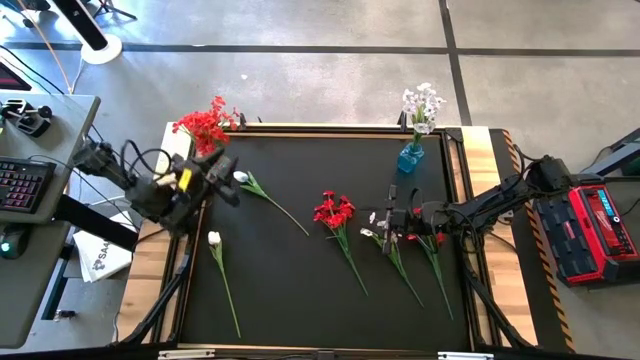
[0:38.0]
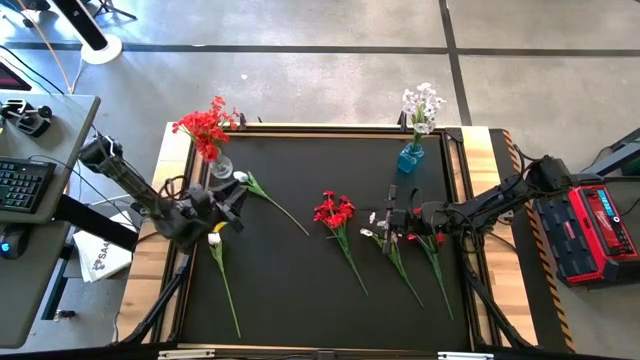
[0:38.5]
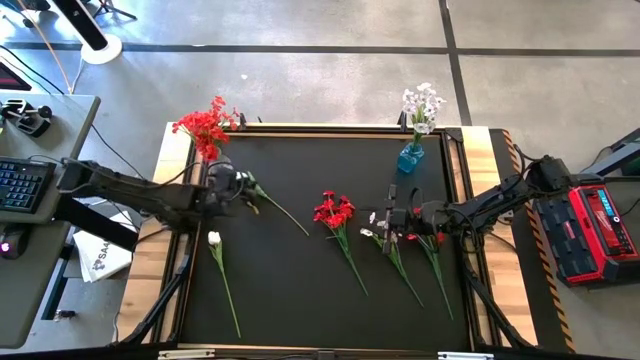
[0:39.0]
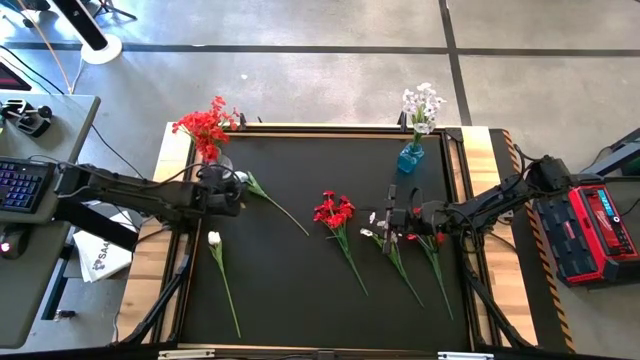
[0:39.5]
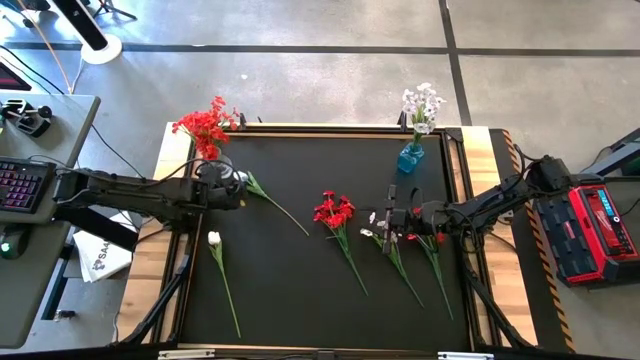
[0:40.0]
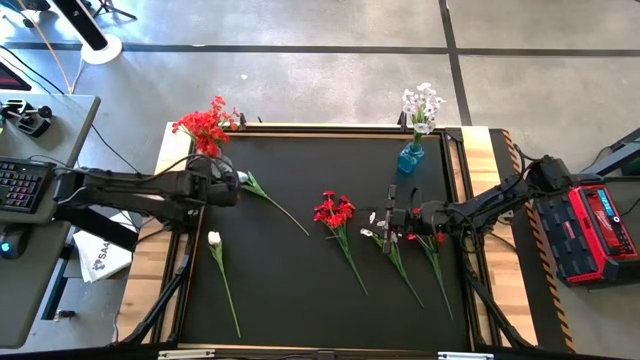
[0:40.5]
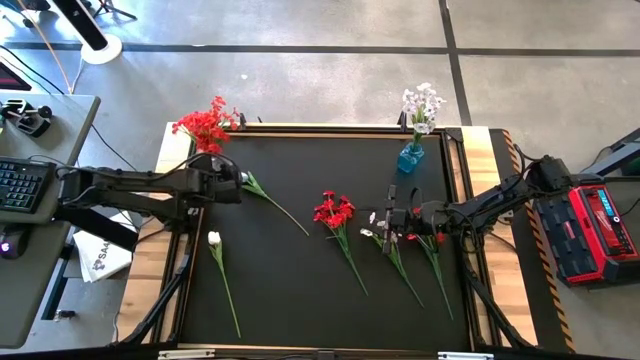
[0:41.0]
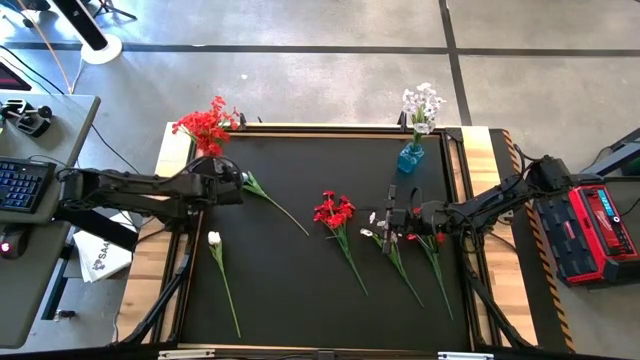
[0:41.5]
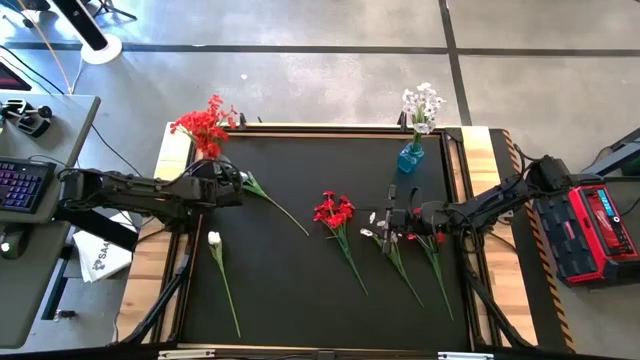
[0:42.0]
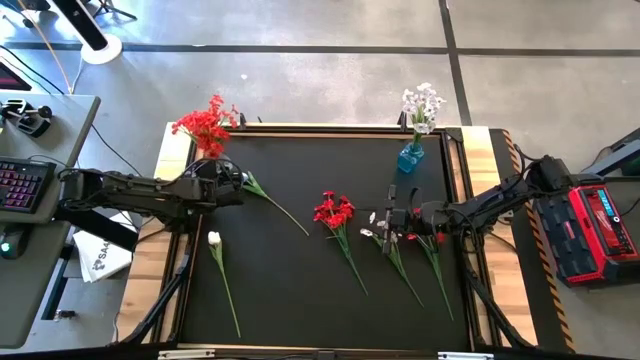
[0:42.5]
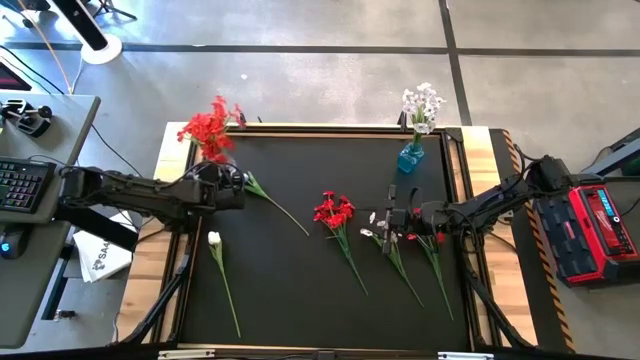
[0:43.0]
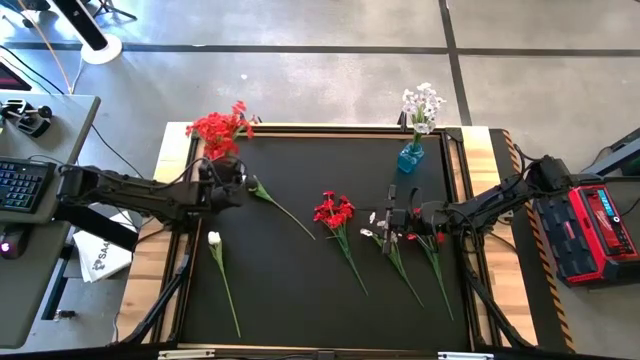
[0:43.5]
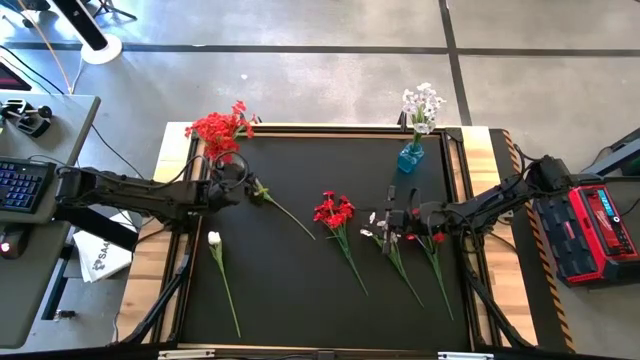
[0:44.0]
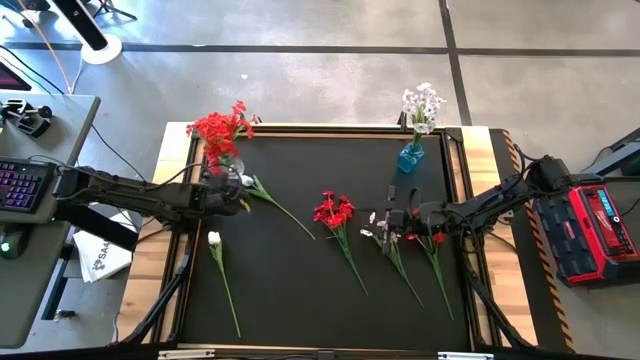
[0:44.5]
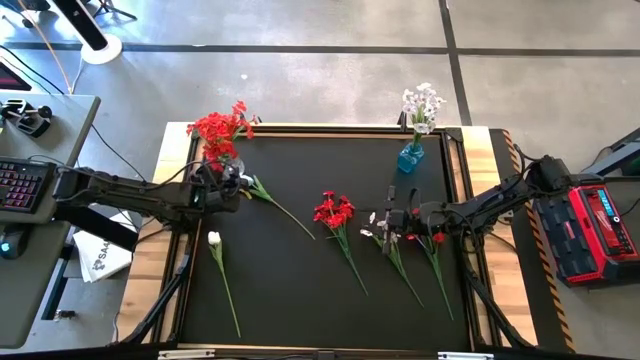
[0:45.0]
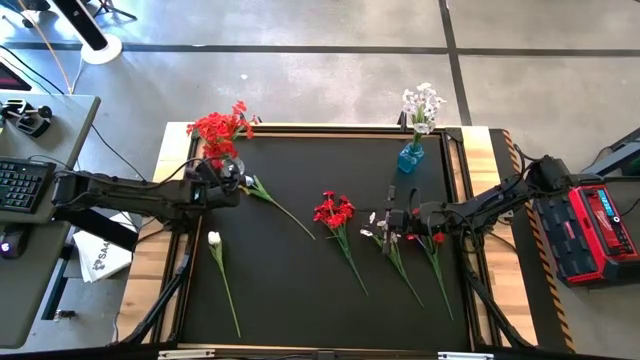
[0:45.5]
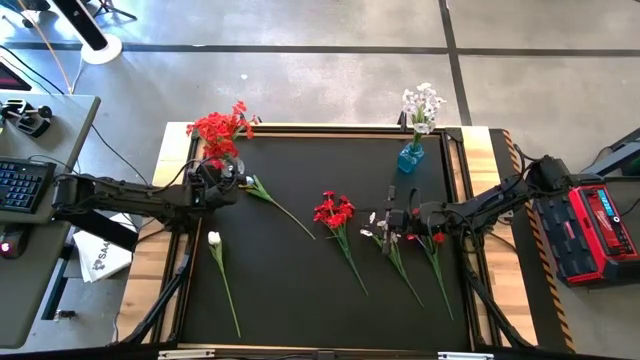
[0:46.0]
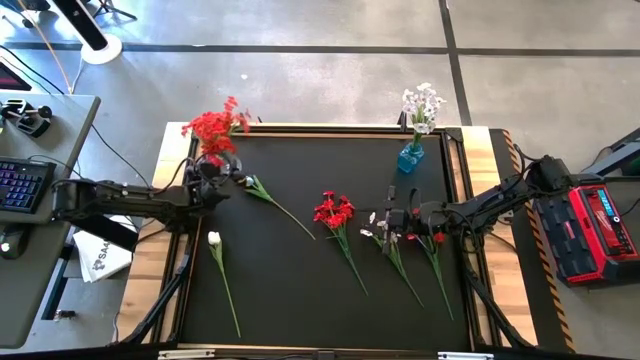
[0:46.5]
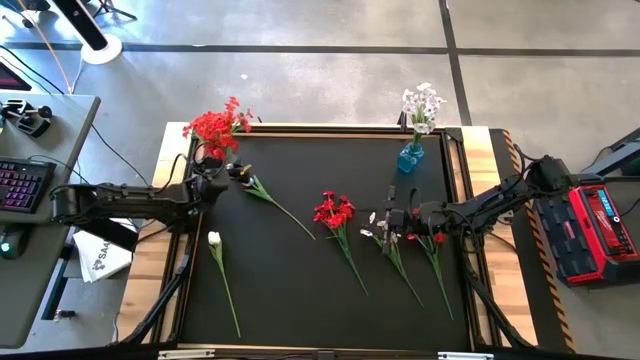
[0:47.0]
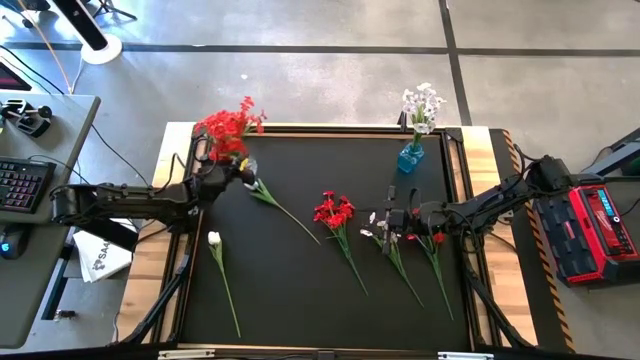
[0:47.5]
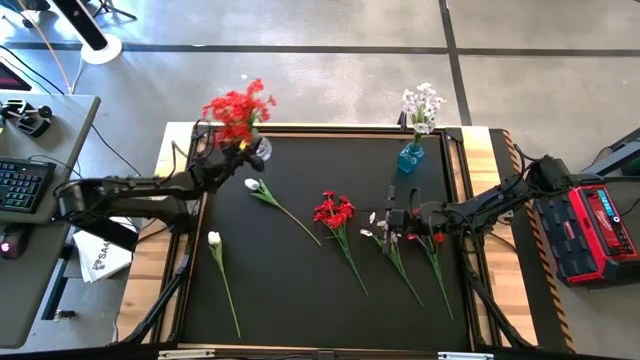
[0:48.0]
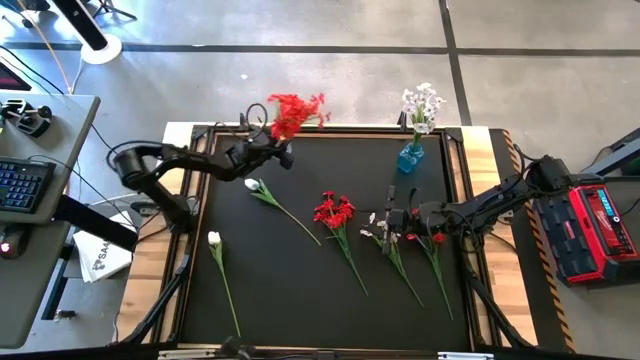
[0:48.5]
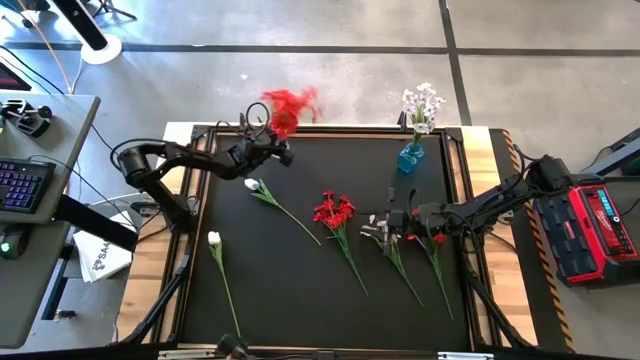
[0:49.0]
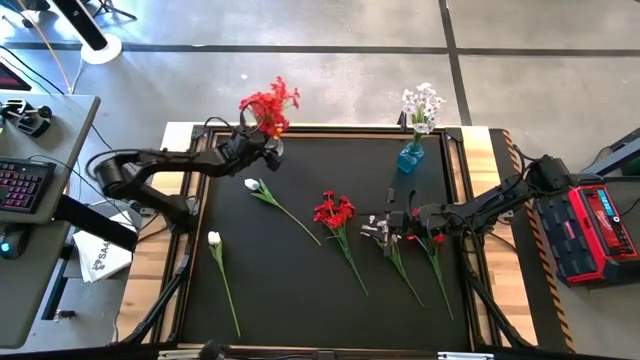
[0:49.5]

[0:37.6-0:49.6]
Task: Sort flowers into vase by color
Adjust the transparent vase

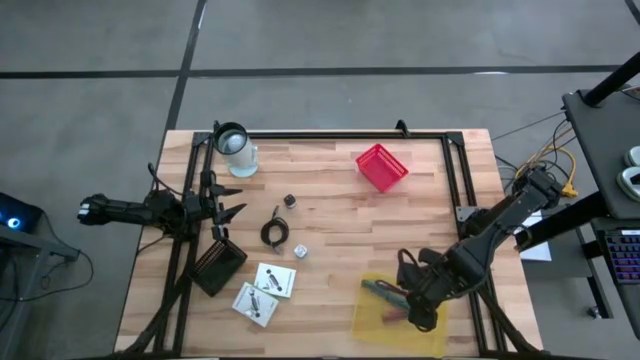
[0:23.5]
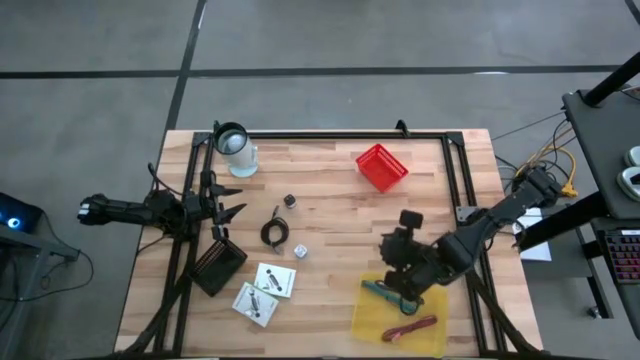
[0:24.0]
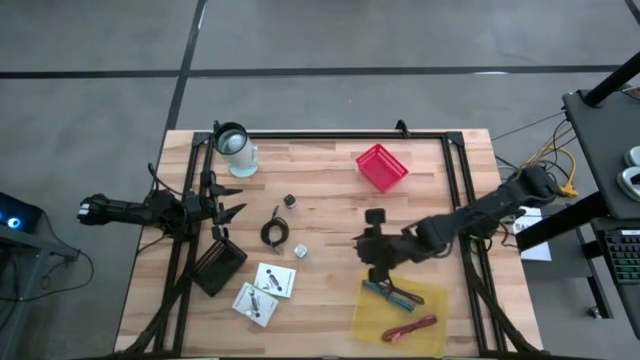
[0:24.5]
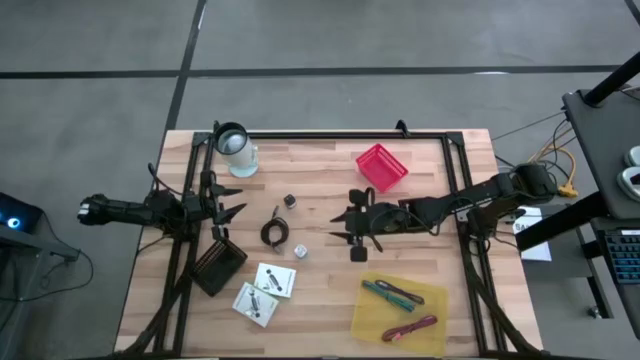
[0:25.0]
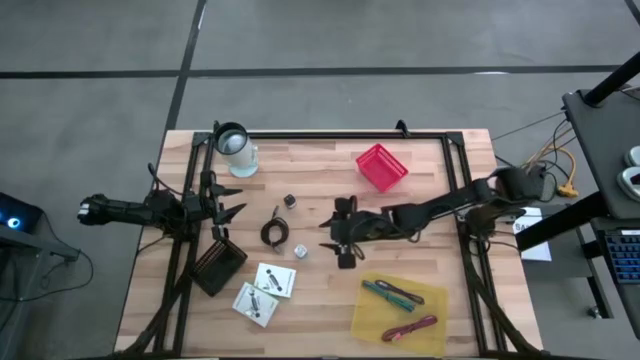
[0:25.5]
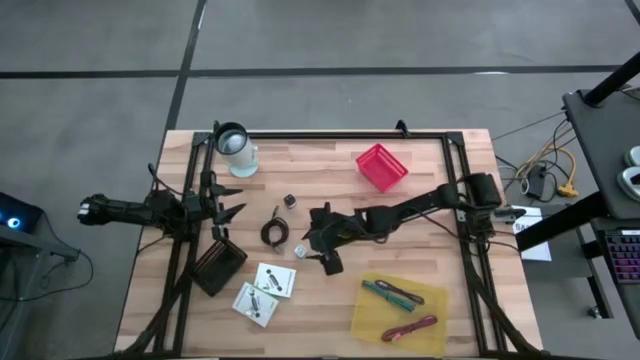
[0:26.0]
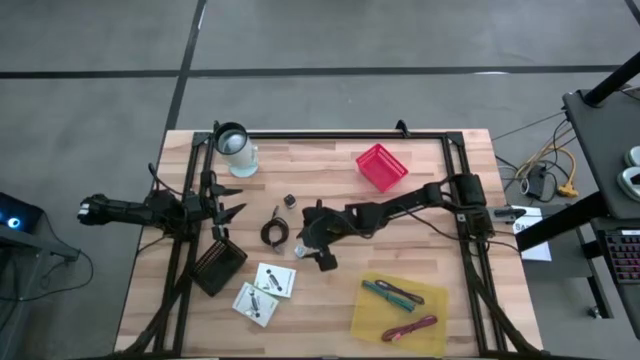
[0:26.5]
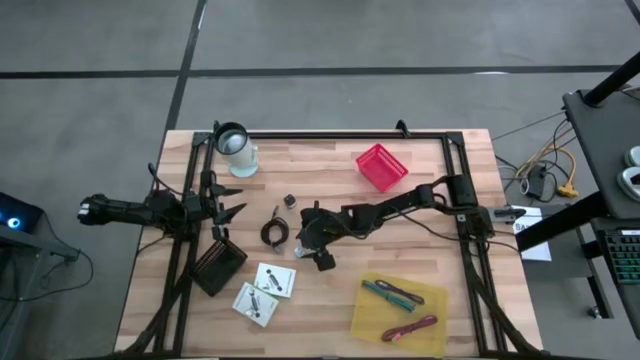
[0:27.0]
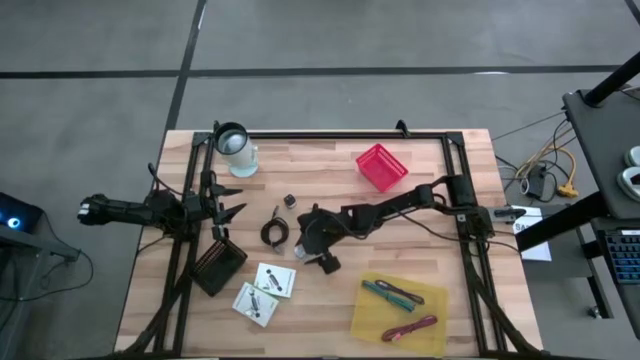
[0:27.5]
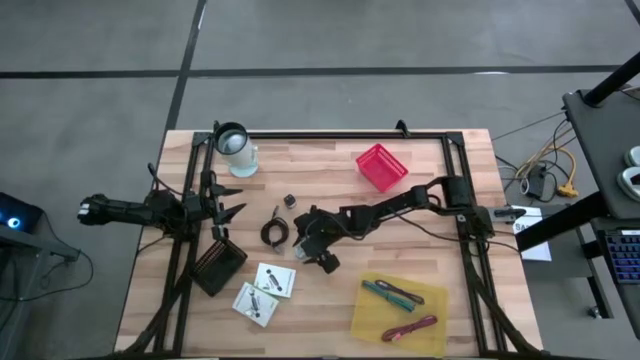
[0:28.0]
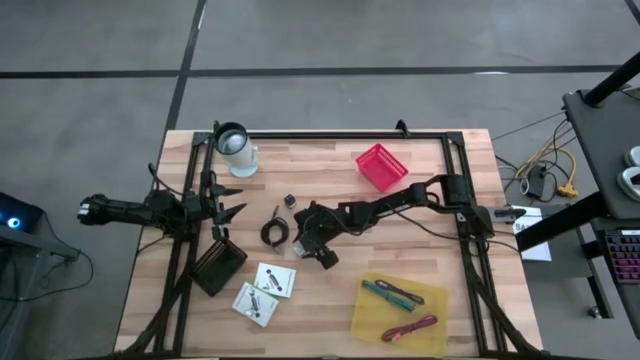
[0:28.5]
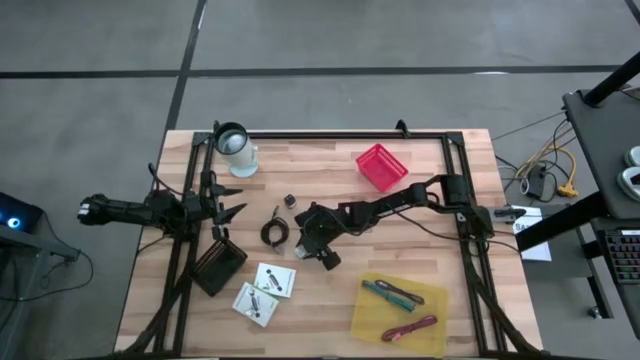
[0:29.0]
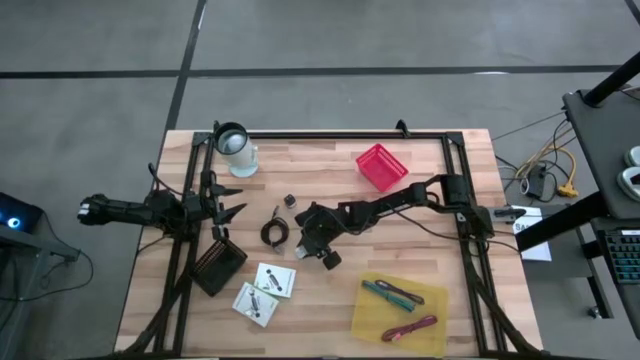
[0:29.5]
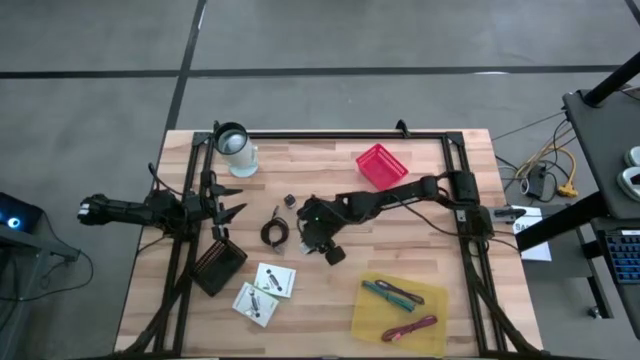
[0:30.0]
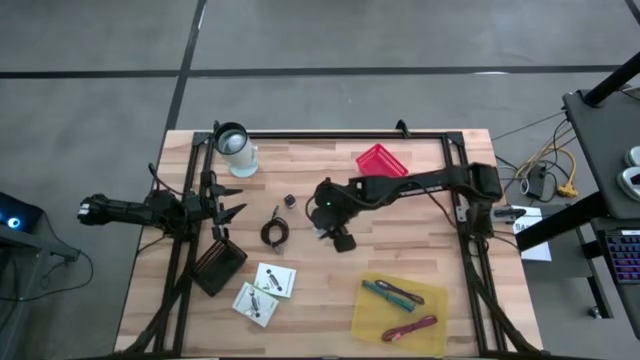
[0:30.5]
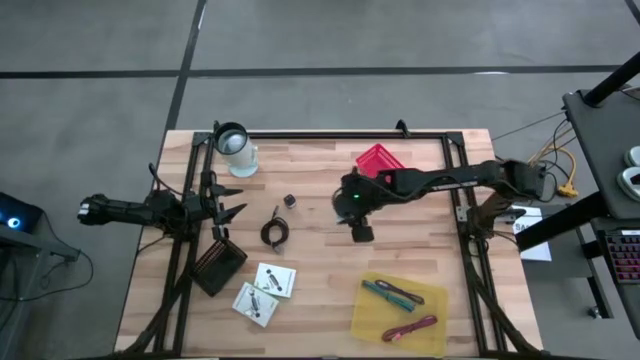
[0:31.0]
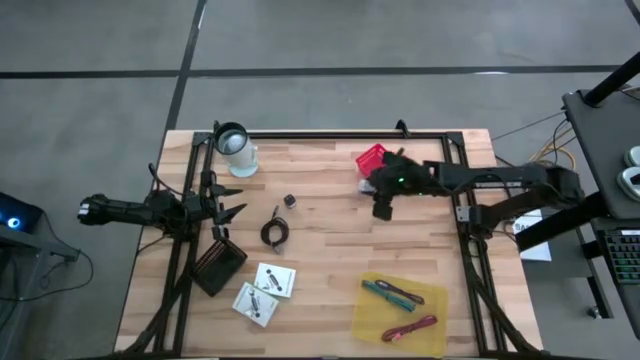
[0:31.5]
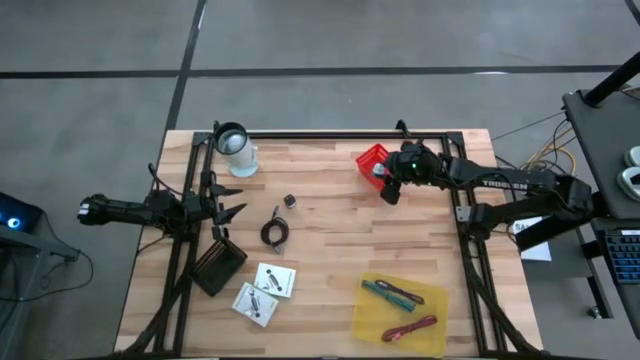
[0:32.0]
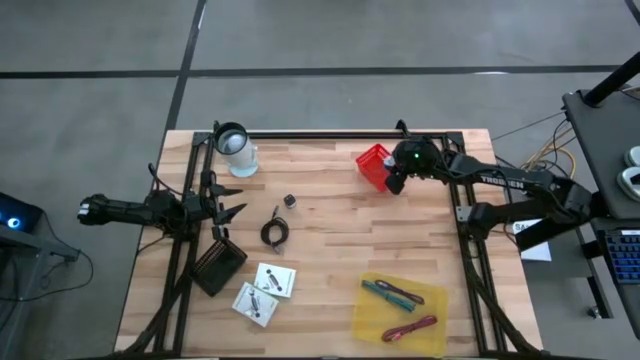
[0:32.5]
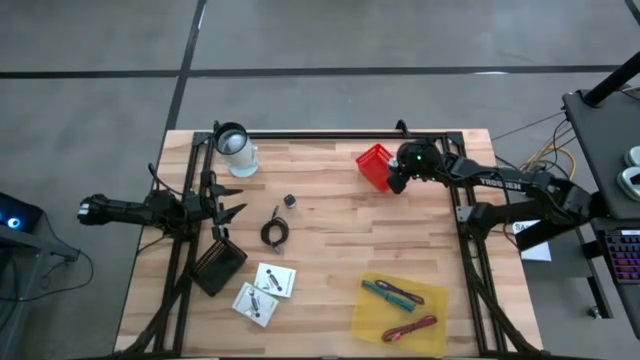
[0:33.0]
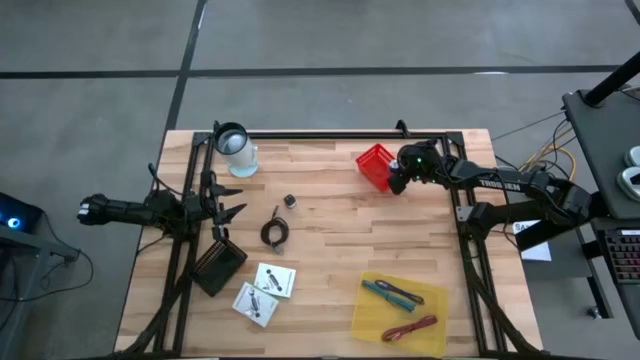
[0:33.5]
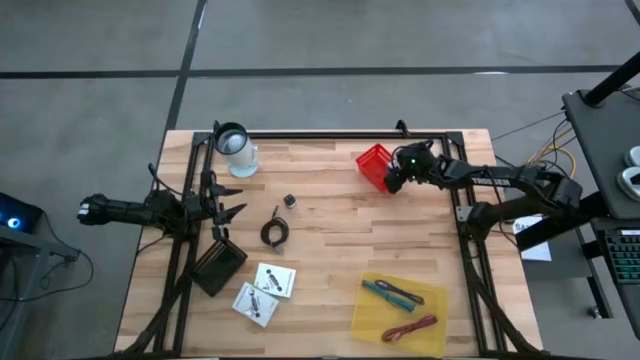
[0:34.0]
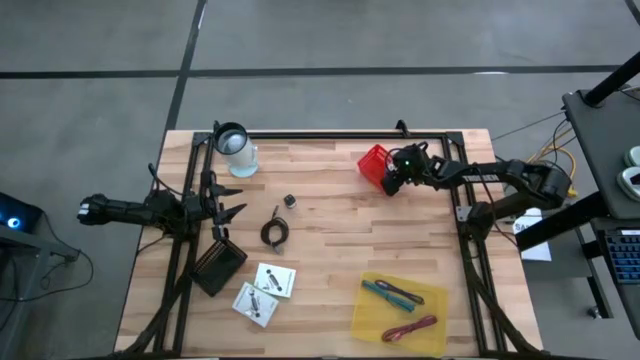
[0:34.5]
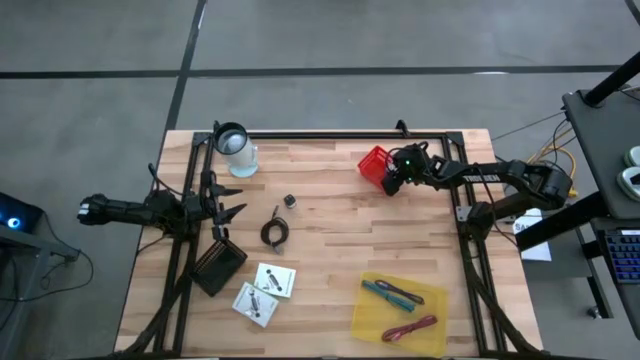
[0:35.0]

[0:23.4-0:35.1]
Task: Pick and place items into bin
Put the light blue charger adapter into the orange bin
